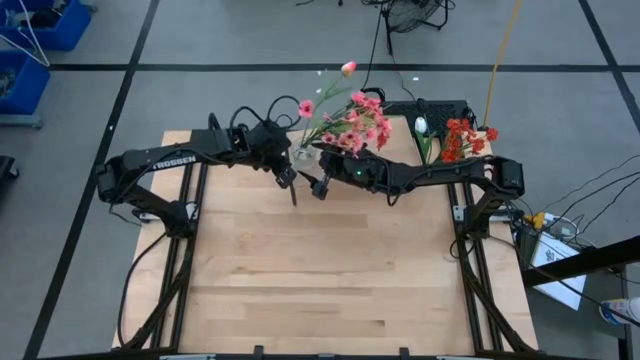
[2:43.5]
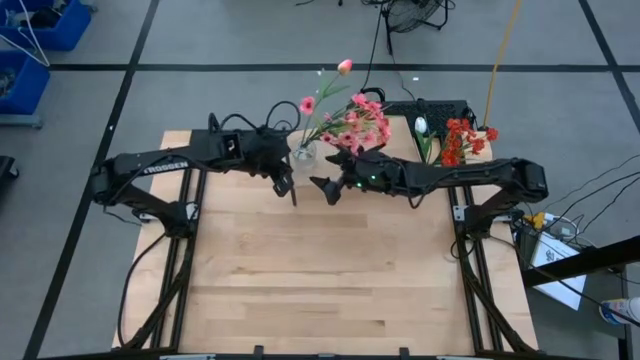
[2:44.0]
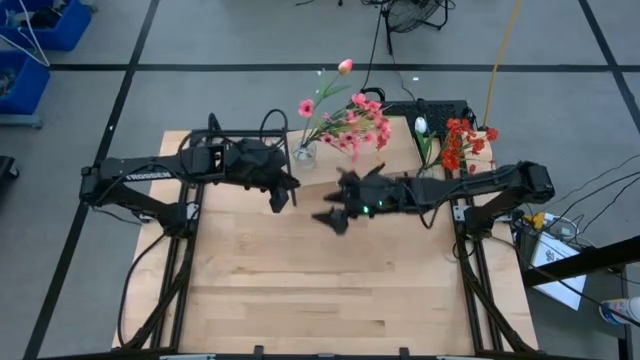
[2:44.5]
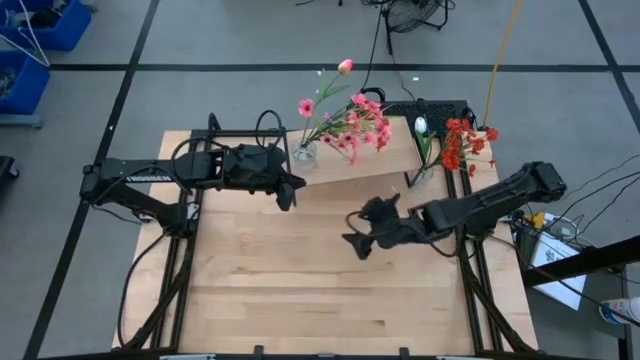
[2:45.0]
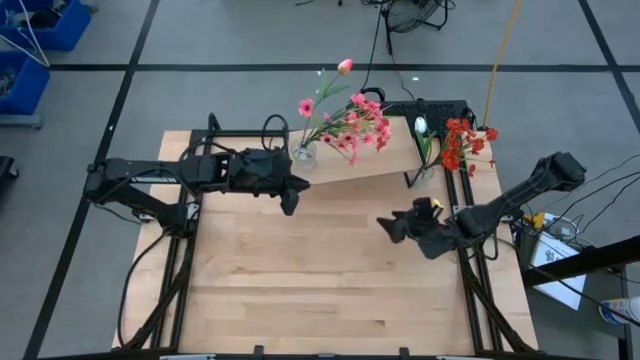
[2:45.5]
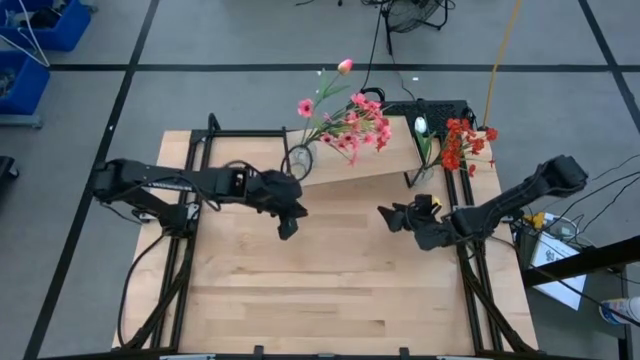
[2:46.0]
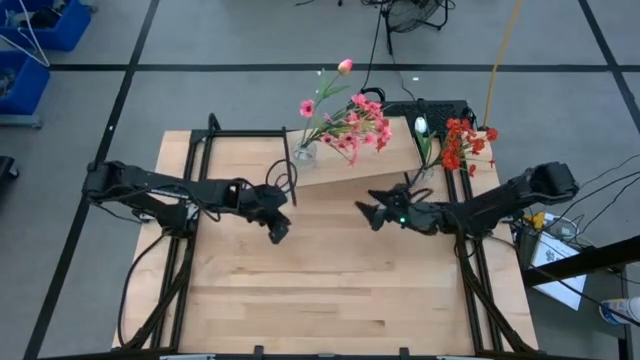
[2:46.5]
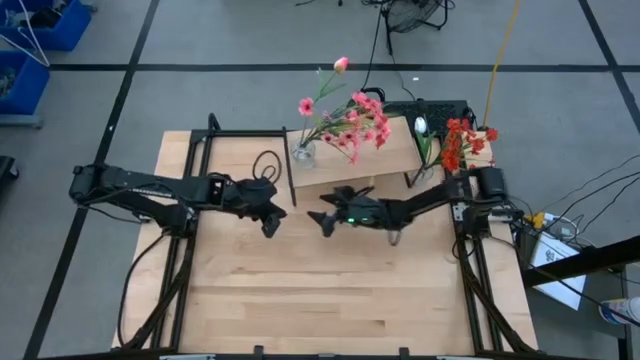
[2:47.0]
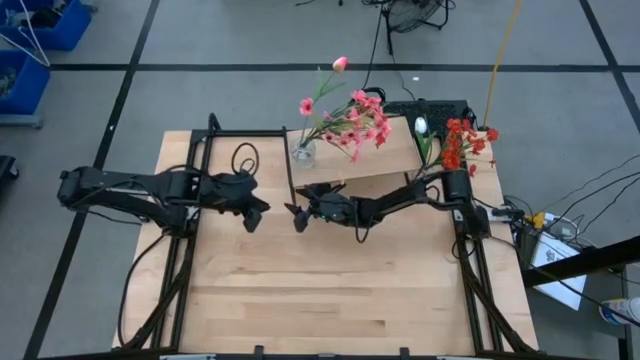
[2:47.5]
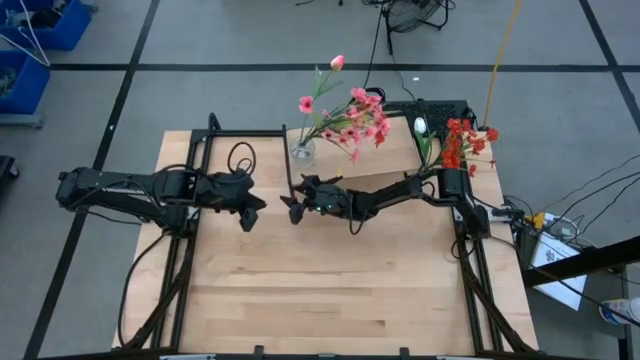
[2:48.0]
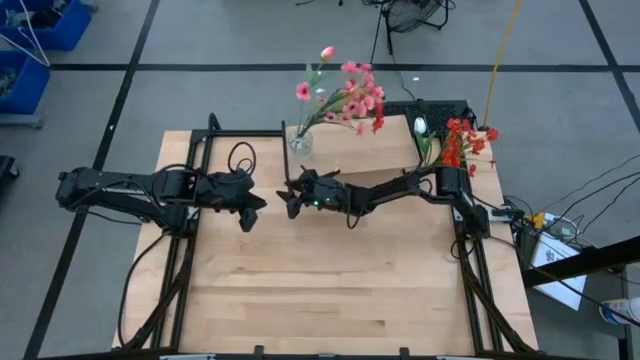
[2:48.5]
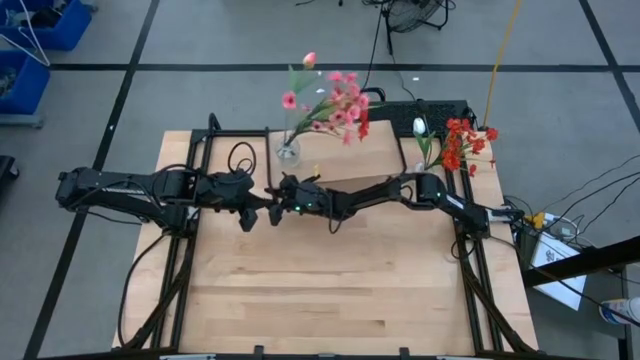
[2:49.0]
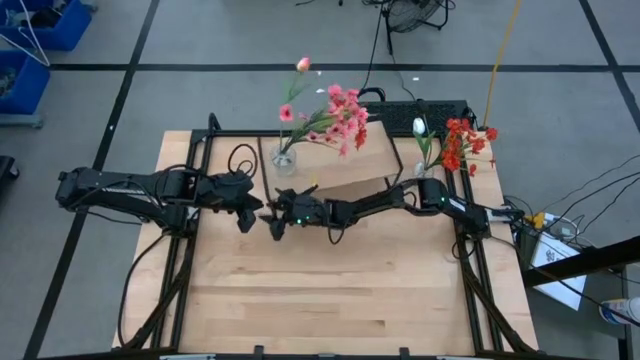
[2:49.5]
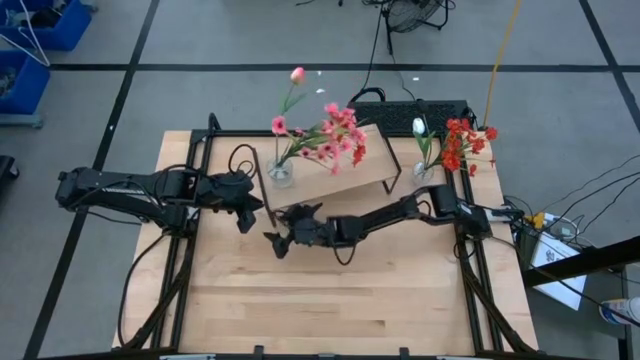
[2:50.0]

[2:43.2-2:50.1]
Task: Pick and place flowers into a vace then onto a shelf
Adjust the shelf on the table

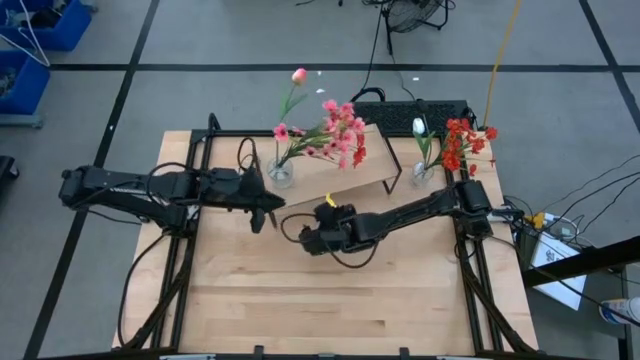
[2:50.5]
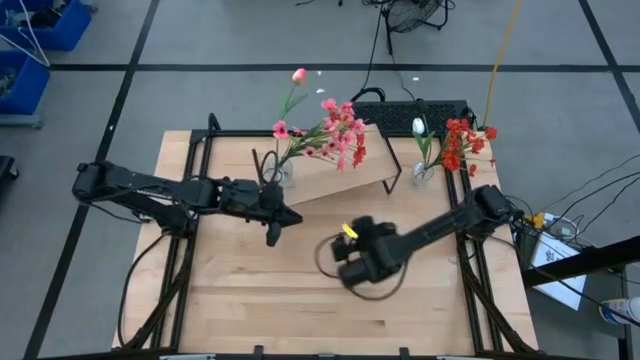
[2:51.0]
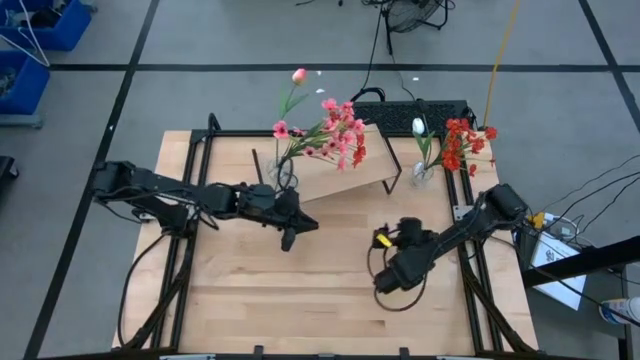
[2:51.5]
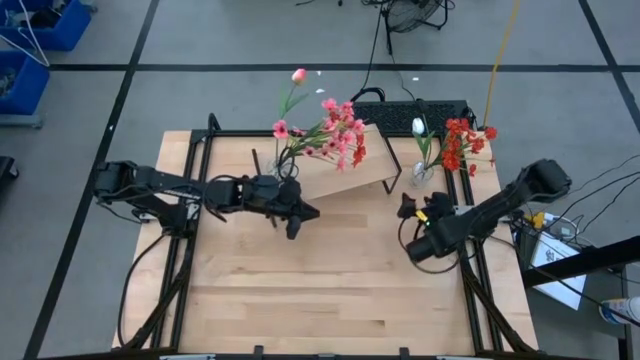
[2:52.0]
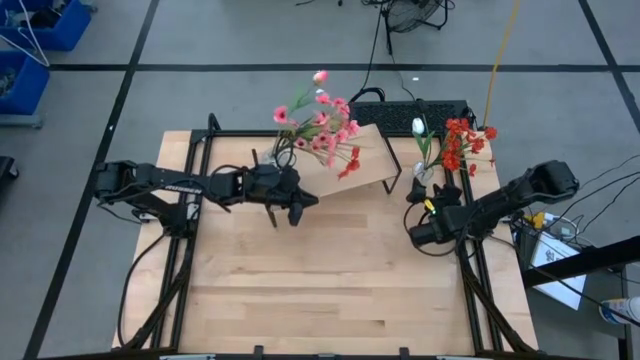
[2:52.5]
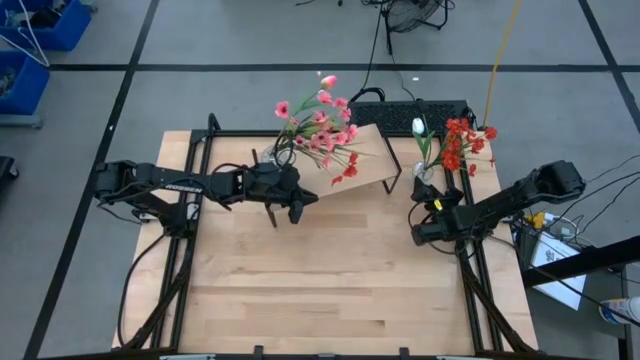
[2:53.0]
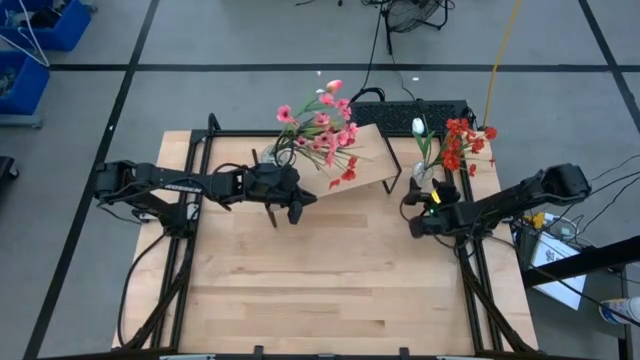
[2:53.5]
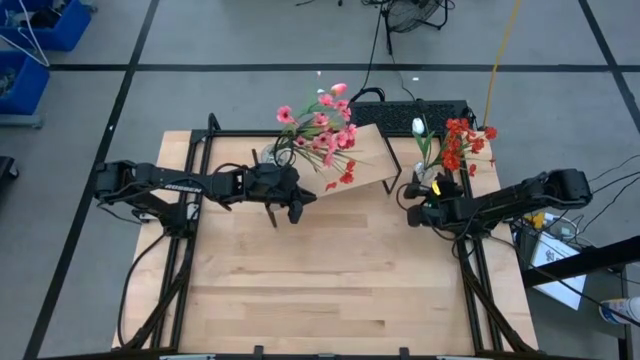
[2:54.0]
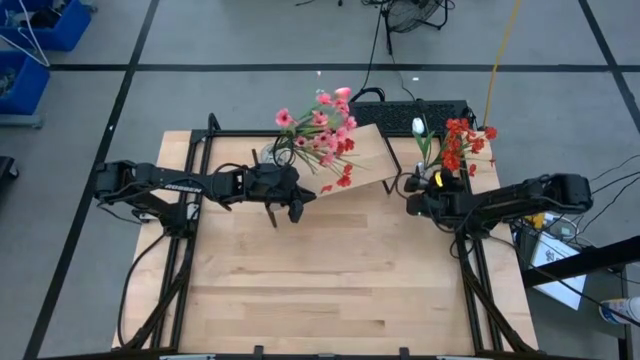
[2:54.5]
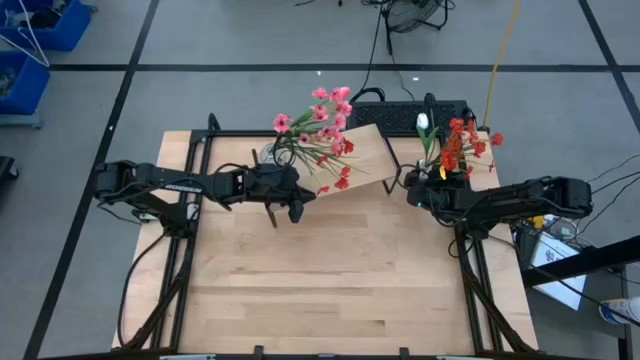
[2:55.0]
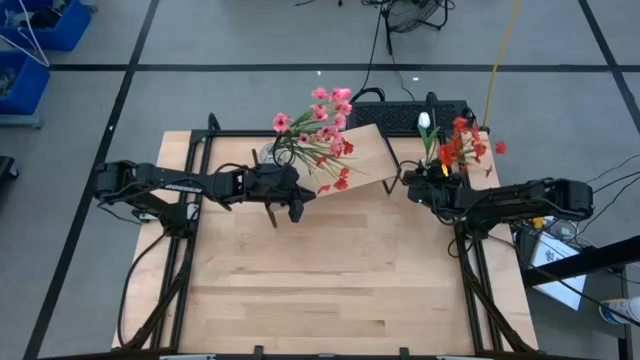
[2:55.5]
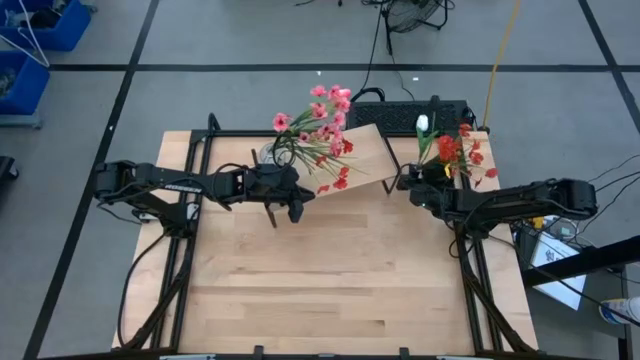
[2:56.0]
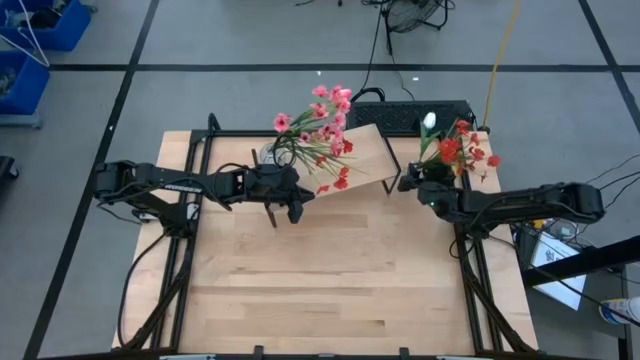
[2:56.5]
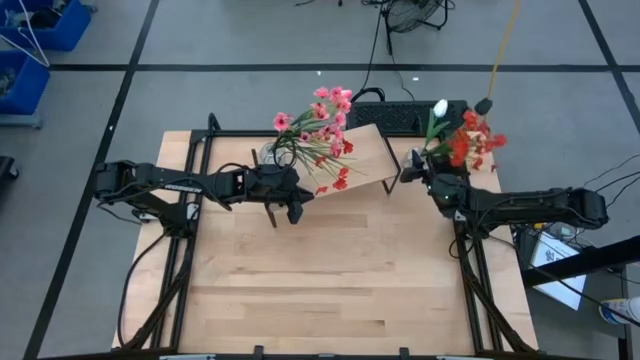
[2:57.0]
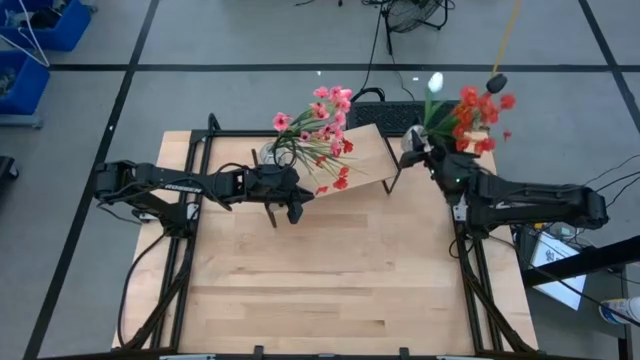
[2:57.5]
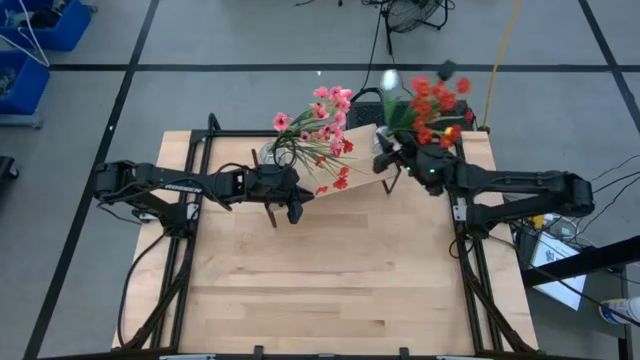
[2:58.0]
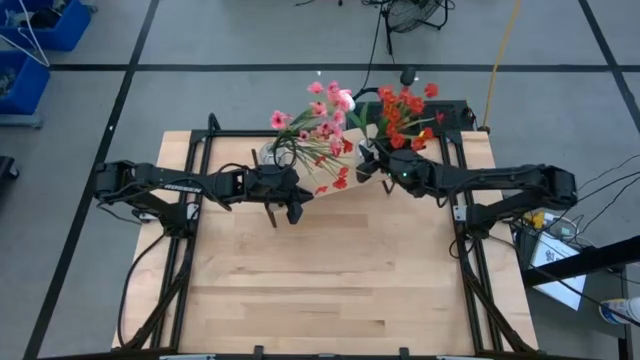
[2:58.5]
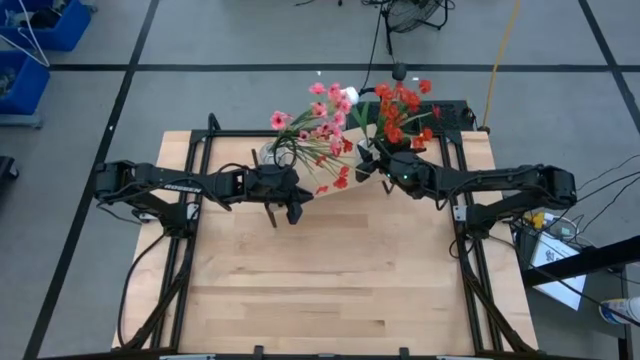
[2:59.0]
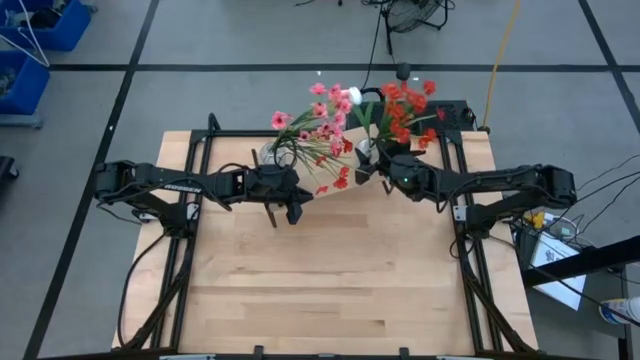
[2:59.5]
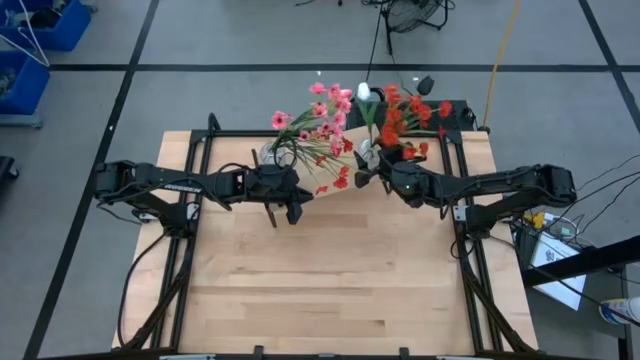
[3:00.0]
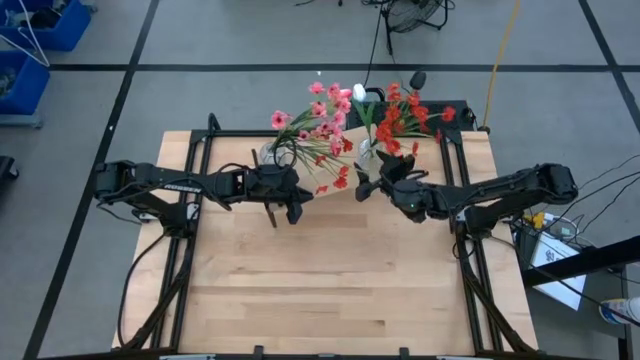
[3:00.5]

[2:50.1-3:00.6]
Put the transparent vase with flowers on the shelf

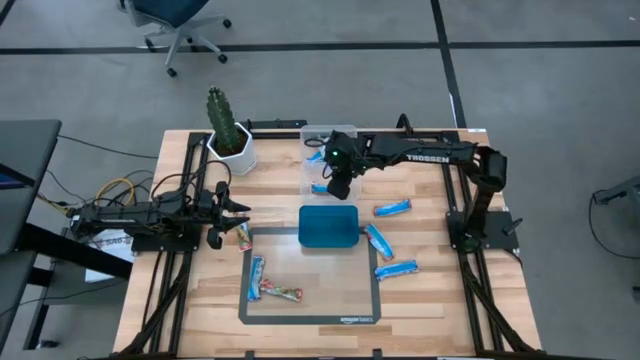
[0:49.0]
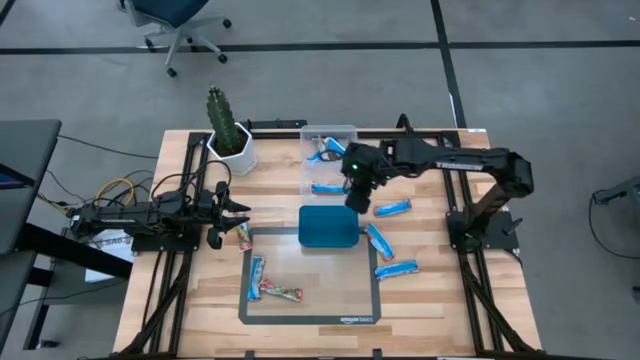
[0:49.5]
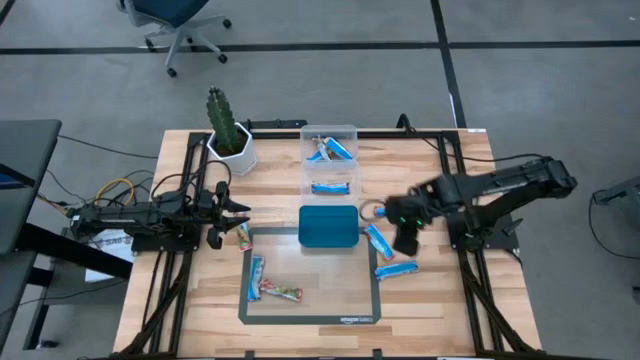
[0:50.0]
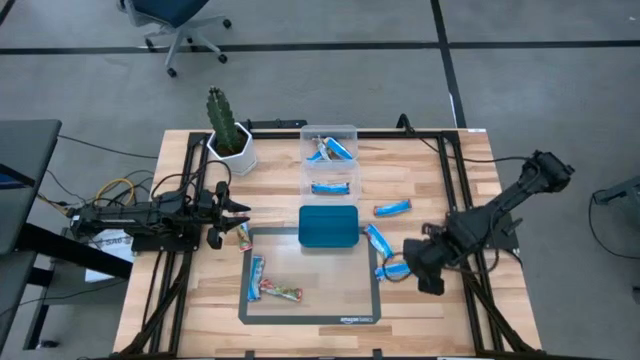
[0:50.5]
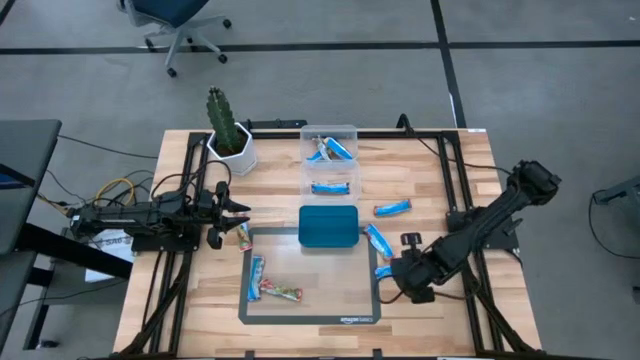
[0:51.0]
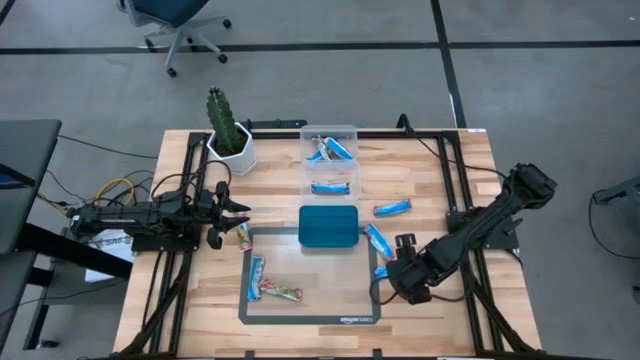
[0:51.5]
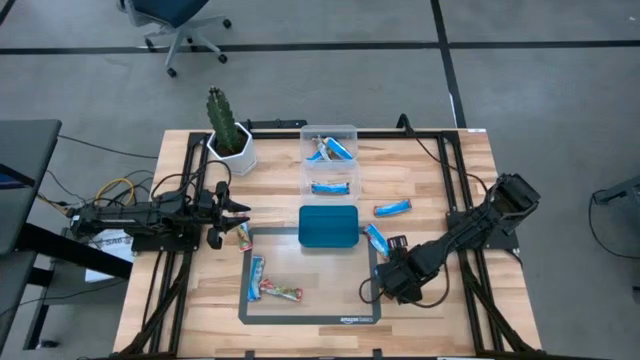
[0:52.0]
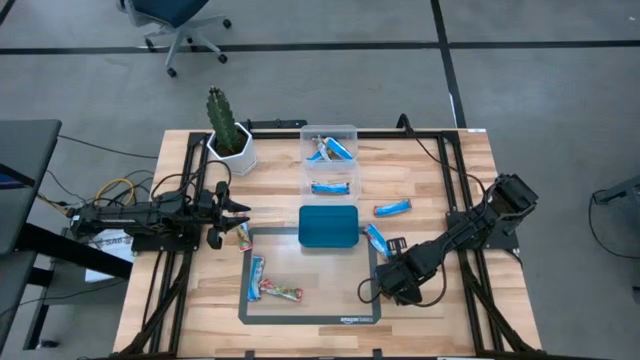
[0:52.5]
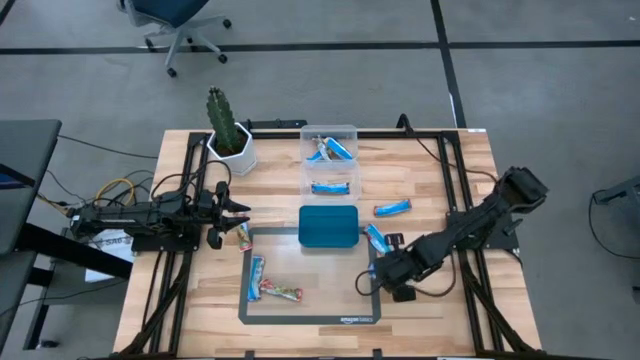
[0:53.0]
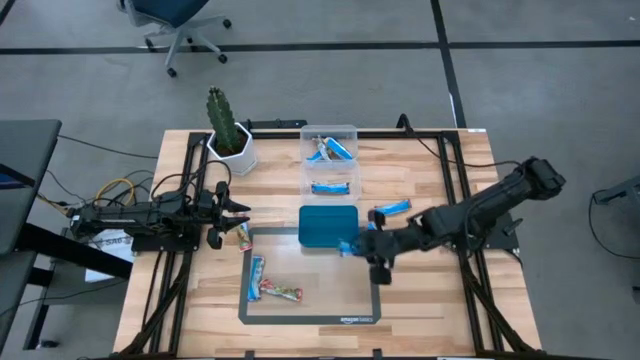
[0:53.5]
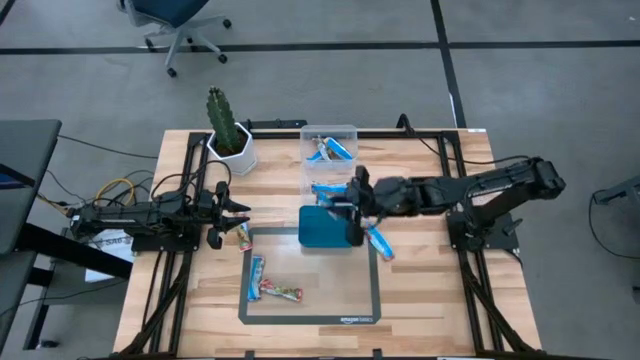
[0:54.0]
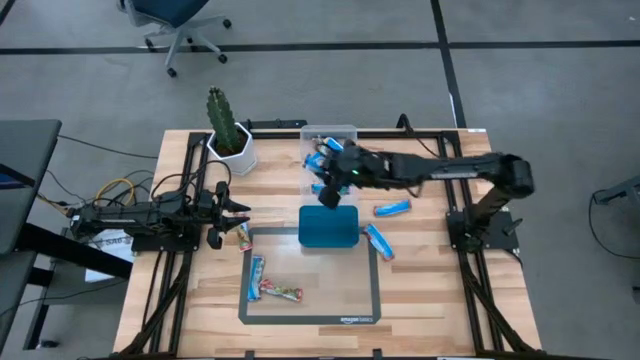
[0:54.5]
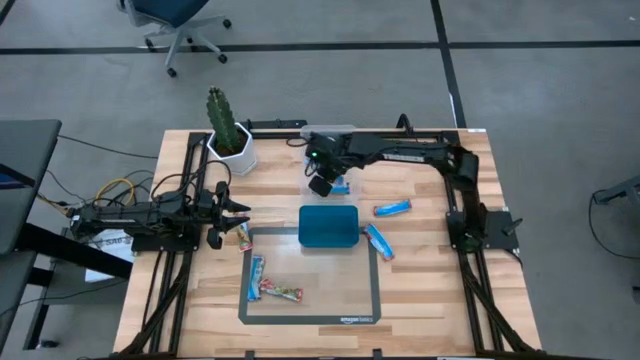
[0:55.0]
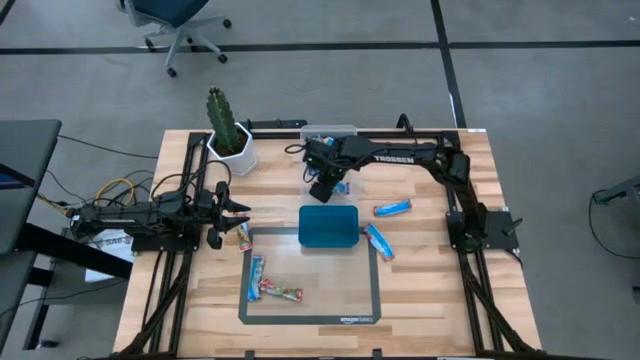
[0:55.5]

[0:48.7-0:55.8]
Task: Pick and place Granola Bars by type
Put the blue granola bar into the bottom transparent bin
